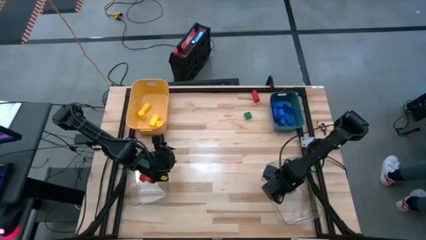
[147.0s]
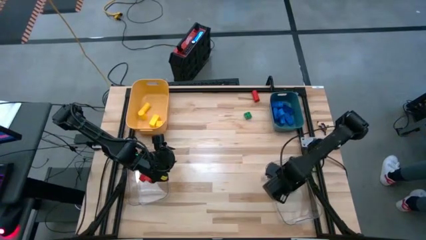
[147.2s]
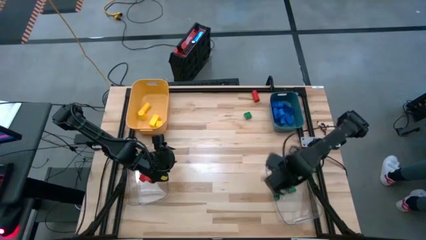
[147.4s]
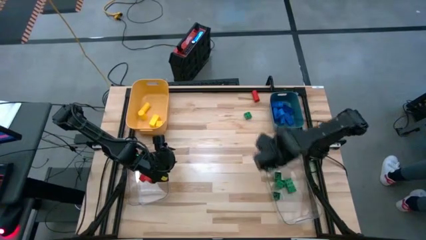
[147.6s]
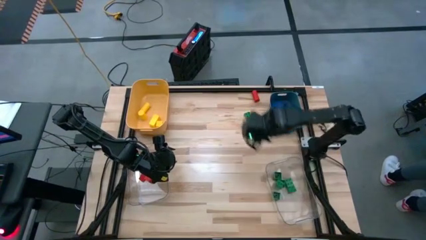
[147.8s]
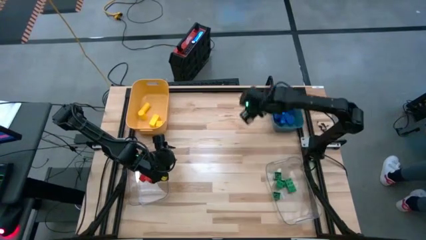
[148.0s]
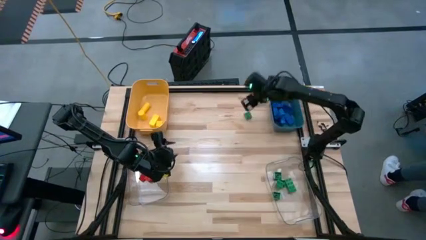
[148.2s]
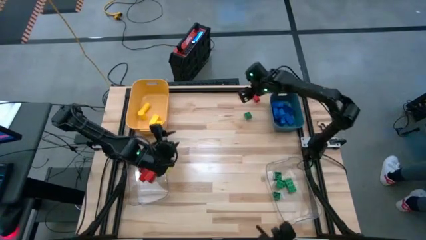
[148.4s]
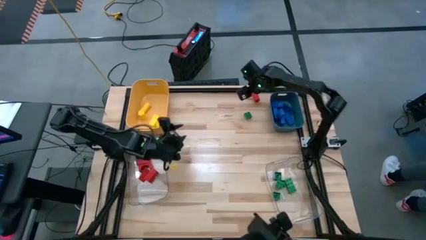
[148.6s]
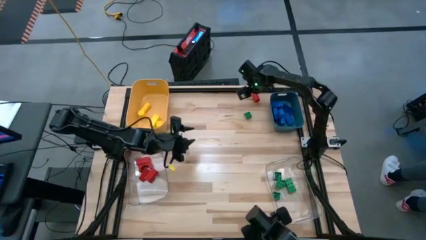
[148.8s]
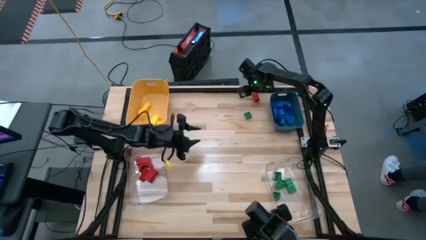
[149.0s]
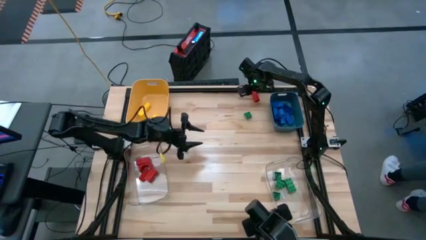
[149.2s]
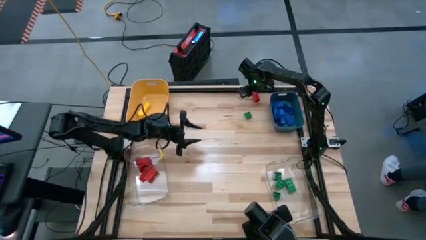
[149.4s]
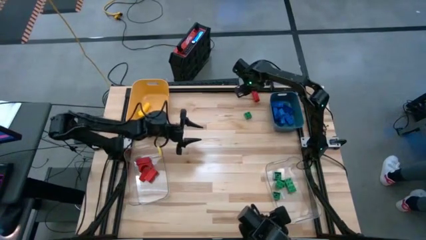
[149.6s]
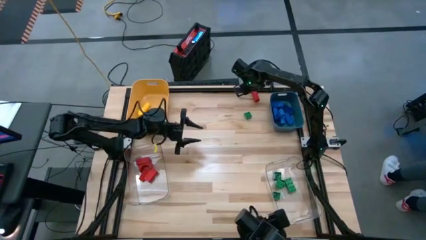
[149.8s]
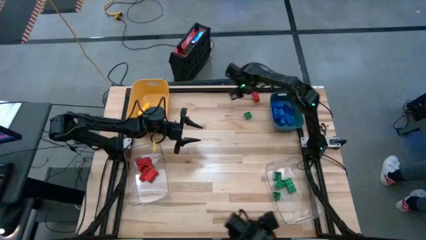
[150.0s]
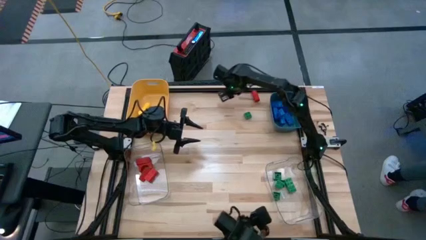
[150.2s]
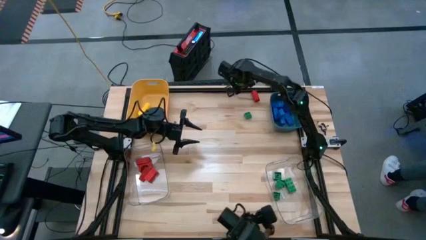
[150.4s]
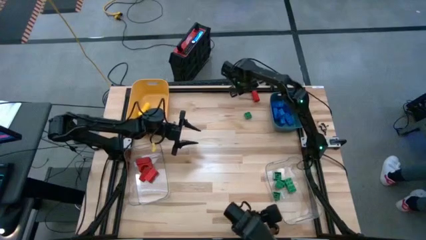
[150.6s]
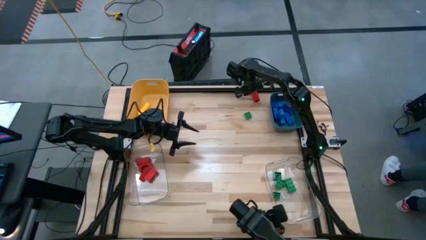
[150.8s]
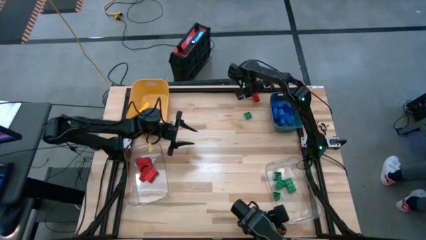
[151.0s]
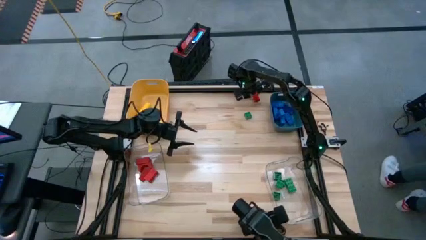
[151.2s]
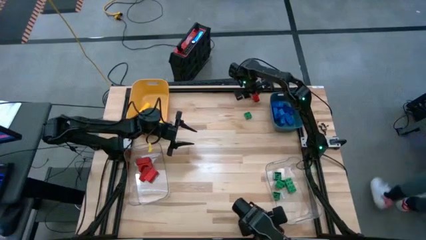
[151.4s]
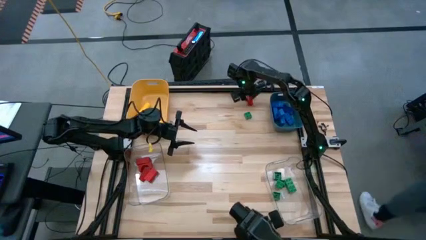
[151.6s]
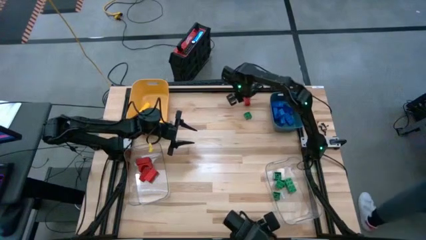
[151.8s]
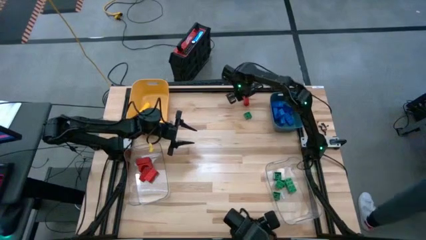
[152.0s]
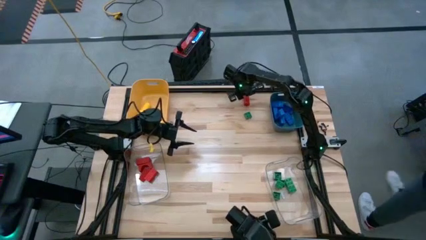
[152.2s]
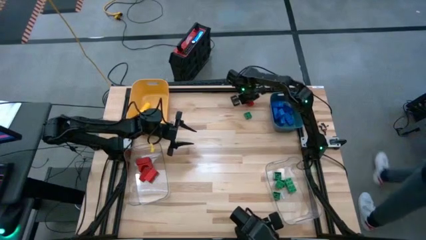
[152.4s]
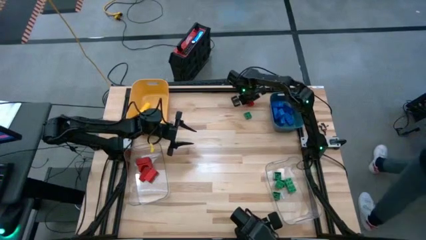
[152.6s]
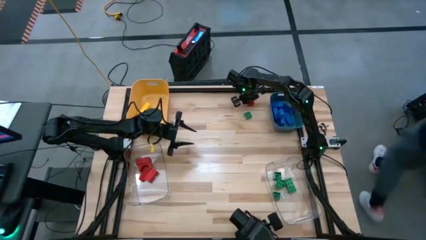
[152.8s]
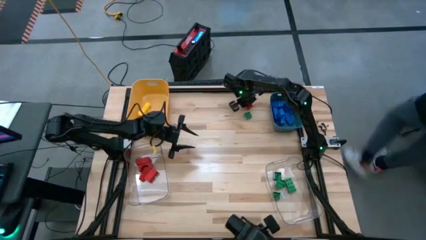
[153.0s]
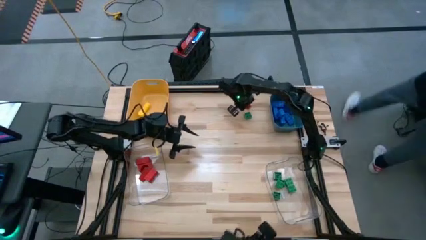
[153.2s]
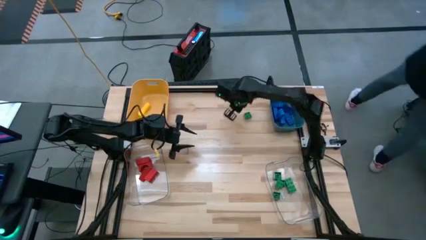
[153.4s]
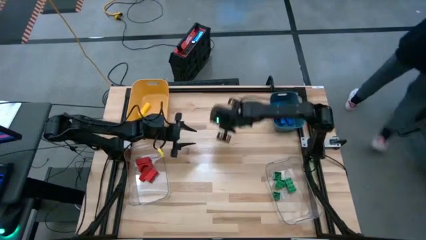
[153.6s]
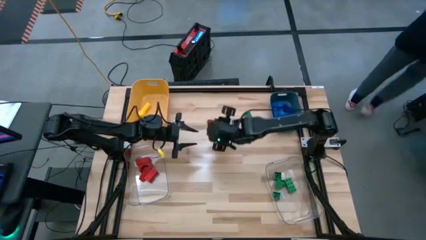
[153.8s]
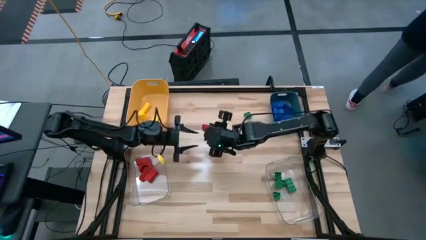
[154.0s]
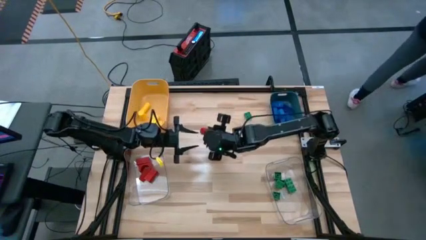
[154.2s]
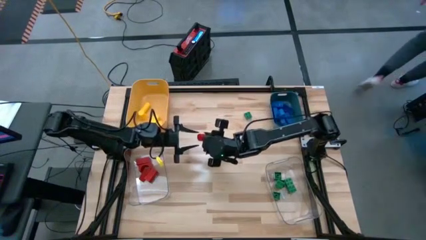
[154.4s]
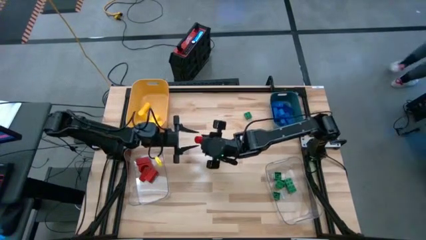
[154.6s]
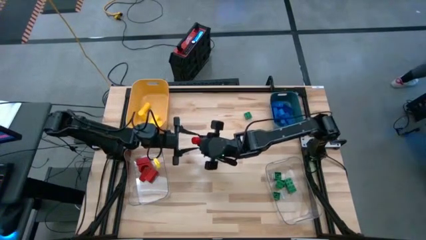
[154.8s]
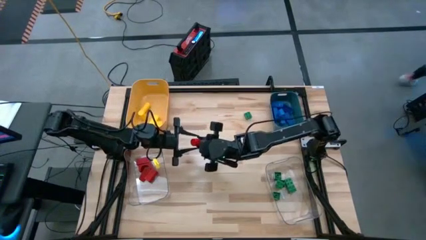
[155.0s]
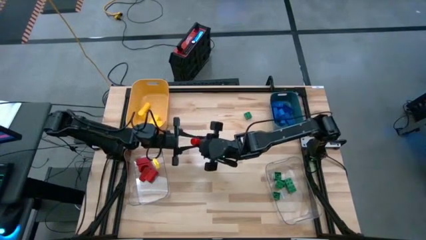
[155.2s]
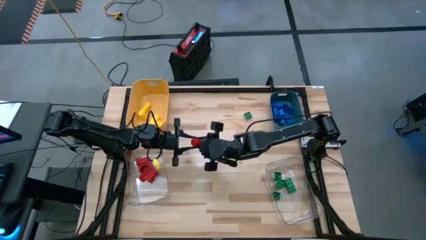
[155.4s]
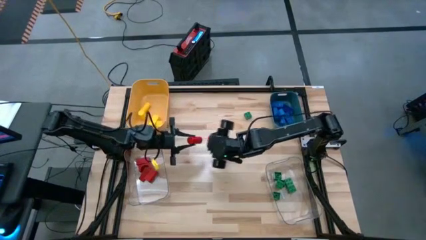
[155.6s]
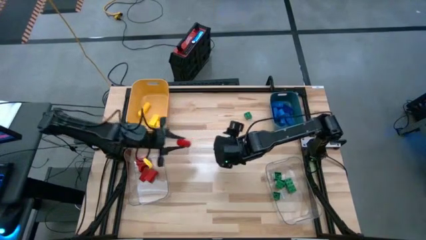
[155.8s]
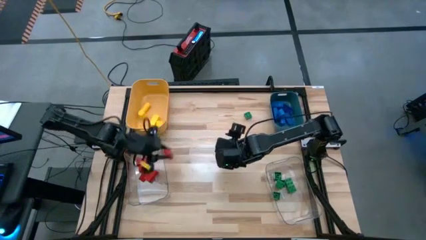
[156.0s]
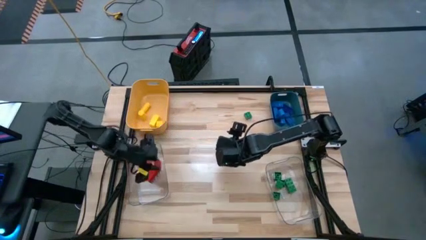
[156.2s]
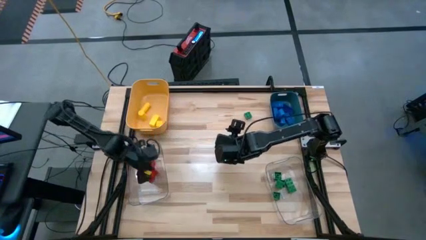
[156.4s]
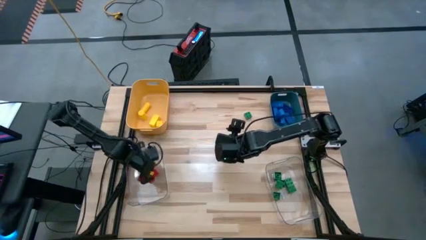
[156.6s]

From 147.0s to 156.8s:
Task: Sort blocks
Put the red wooden block into the left transparent bin

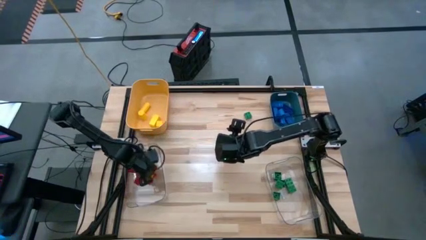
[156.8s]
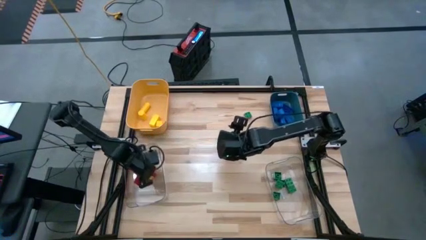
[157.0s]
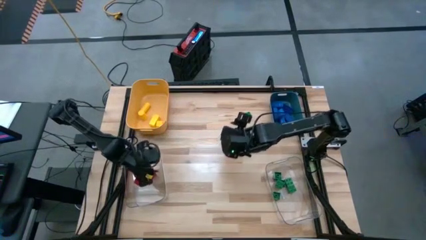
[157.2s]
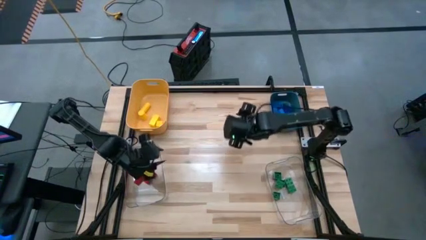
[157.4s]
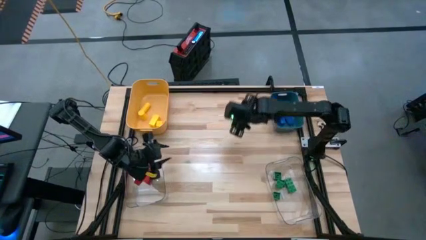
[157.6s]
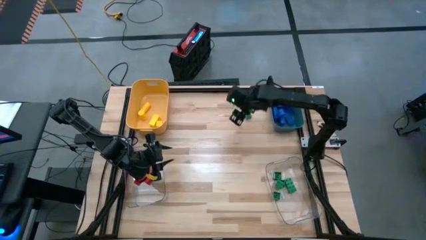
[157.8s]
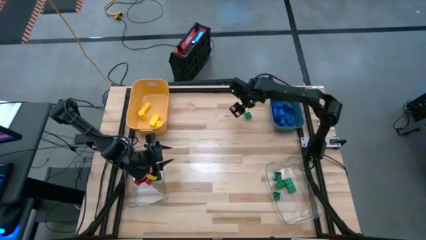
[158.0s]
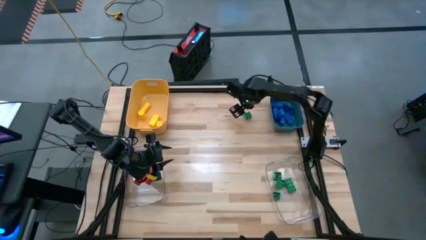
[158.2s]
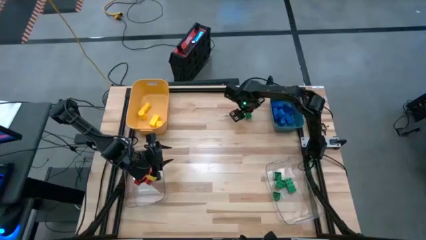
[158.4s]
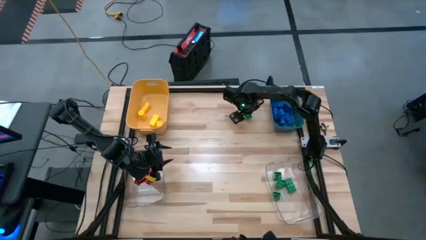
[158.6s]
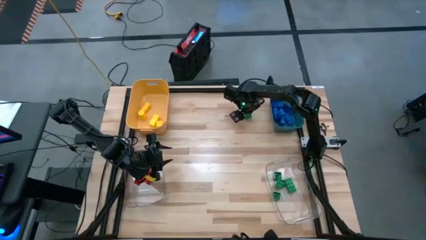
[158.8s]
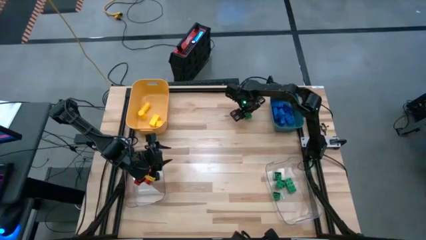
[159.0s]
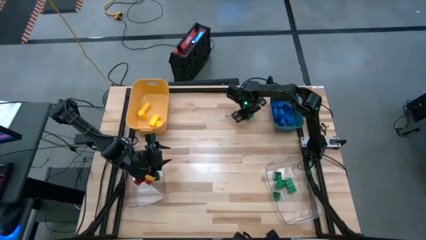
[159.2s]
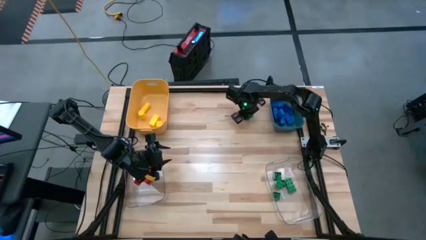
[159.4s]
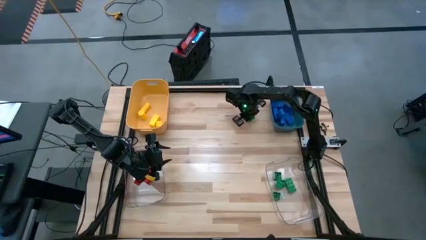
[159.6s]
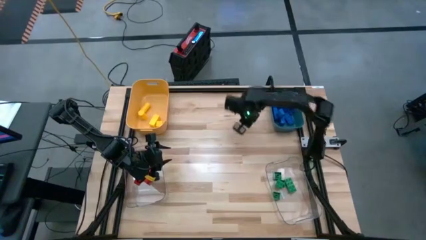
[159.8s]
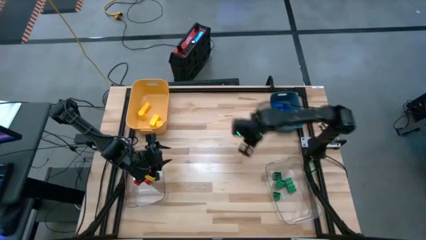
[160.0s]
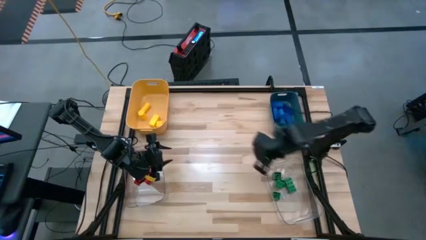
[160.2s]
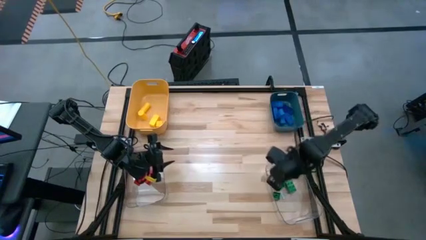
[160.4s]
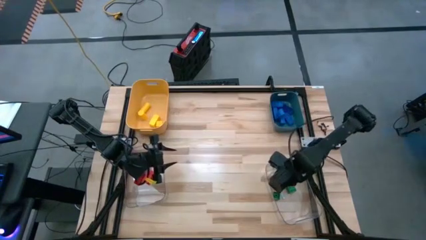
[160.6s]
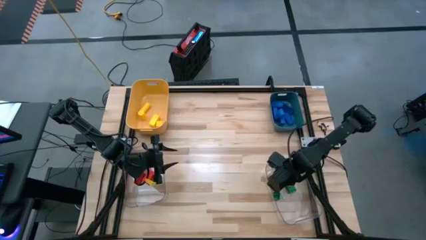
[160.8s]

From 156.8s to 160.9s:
Put the green game piece into the right transparent bin
